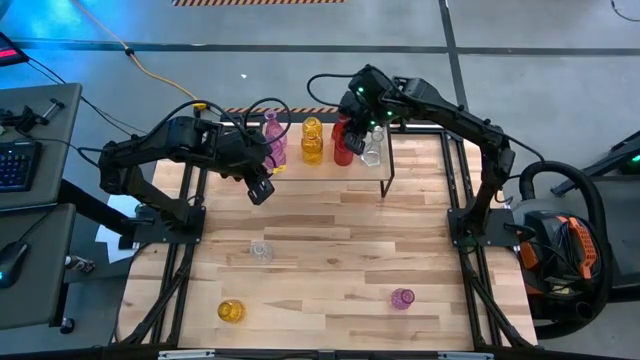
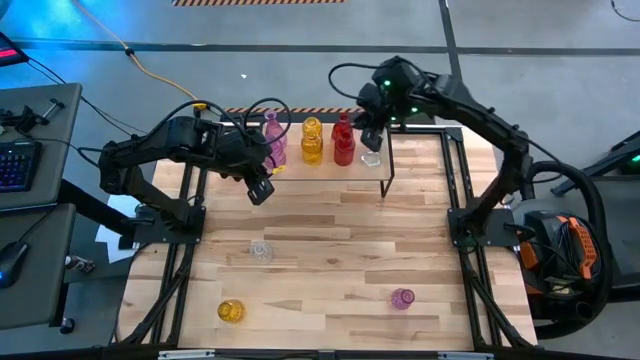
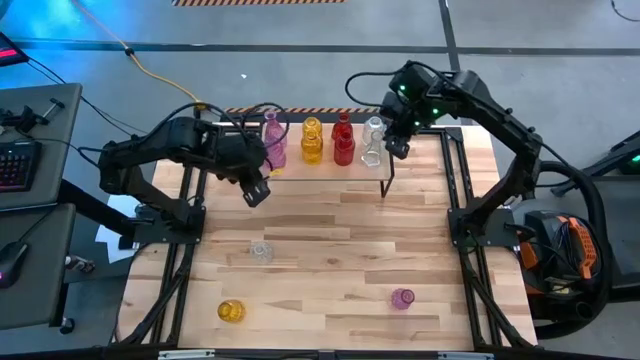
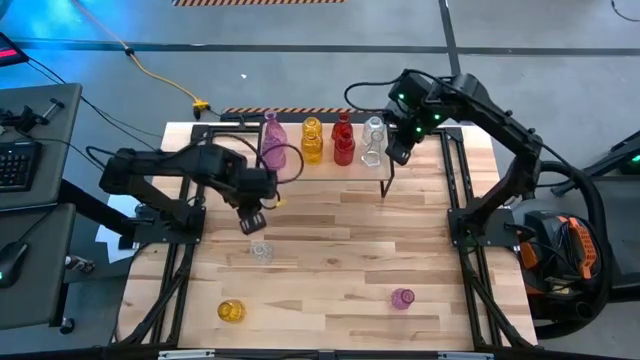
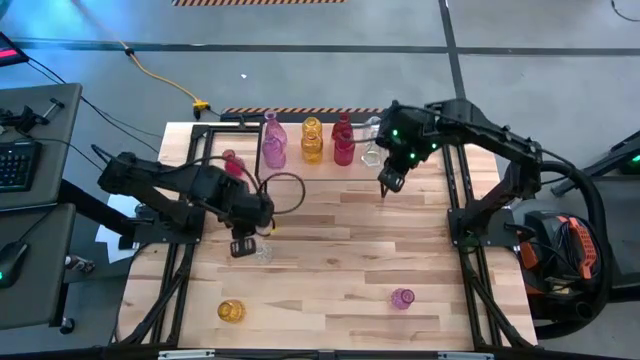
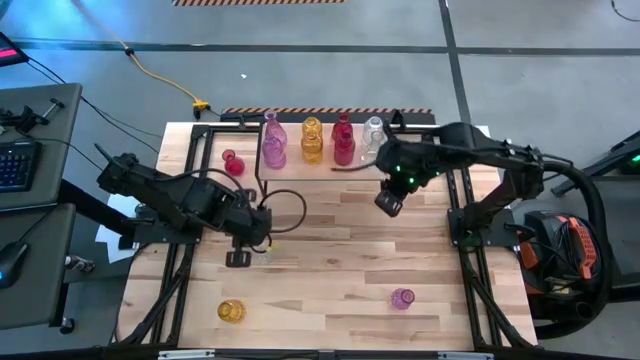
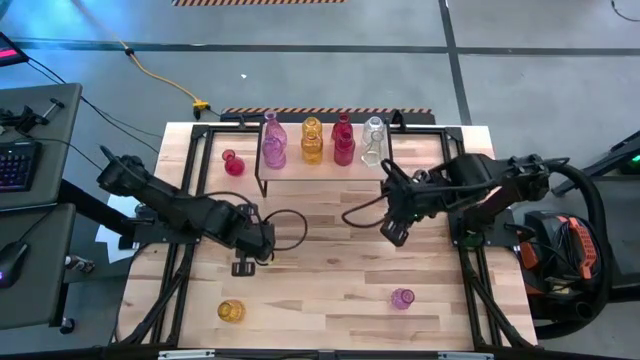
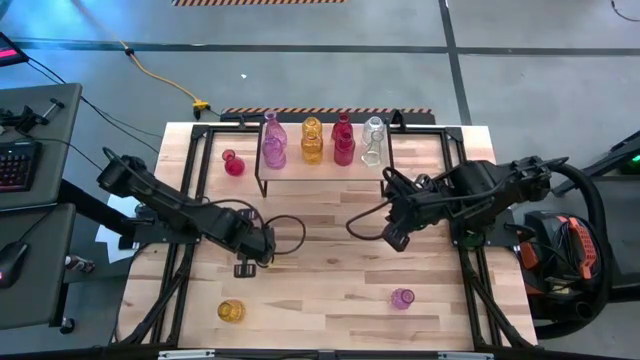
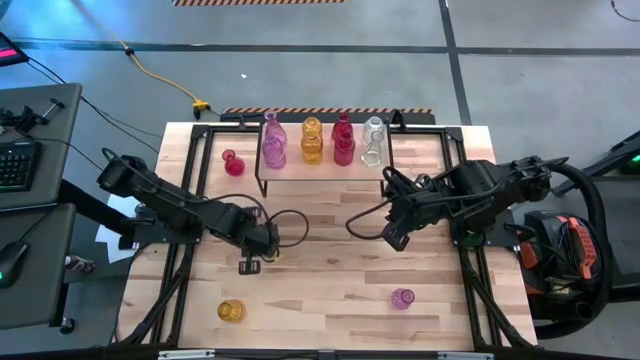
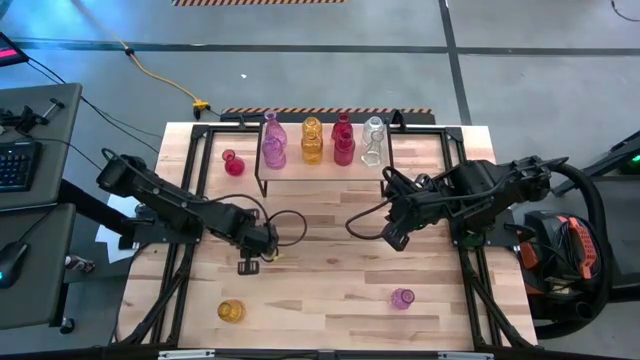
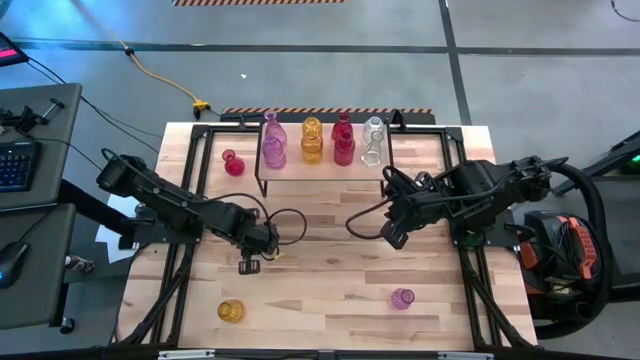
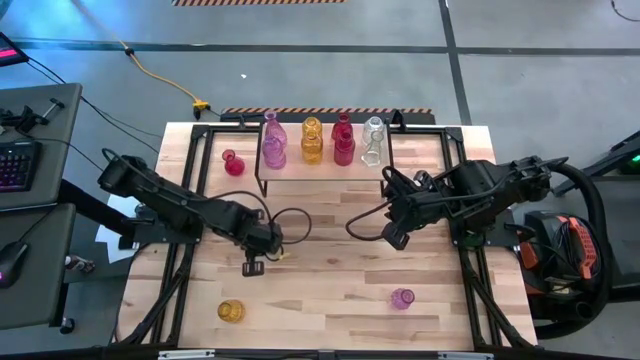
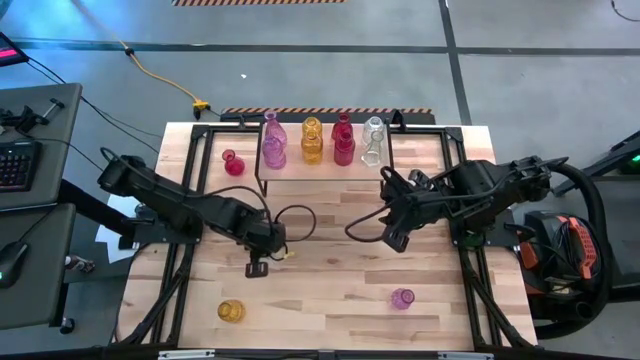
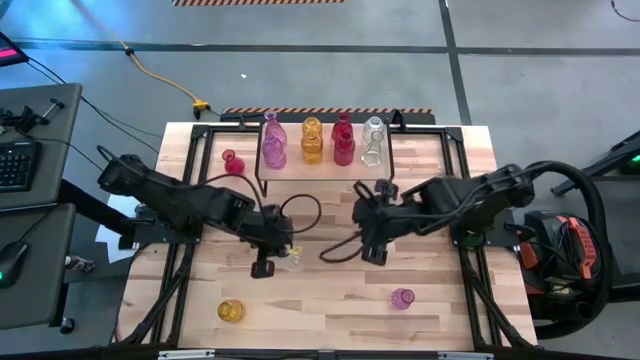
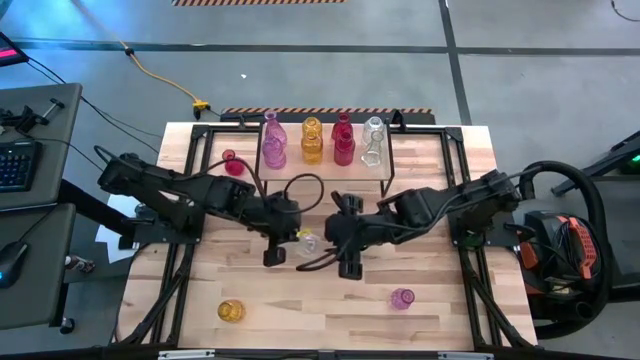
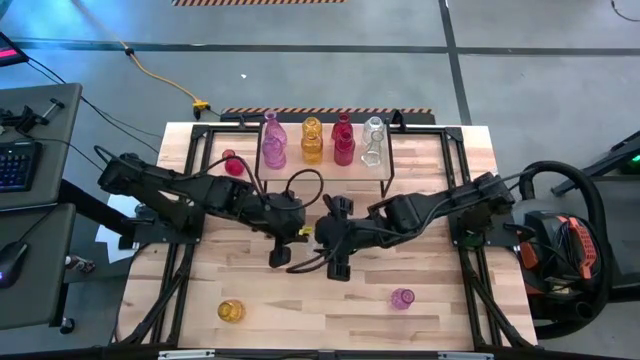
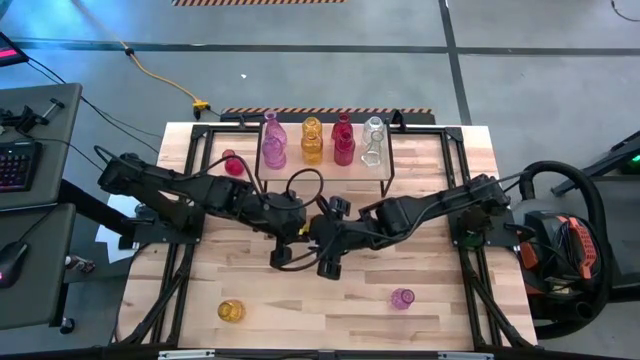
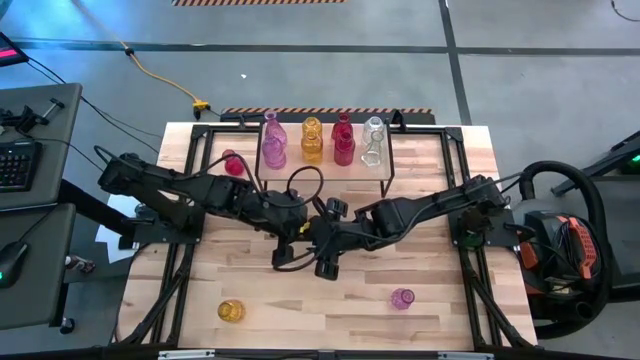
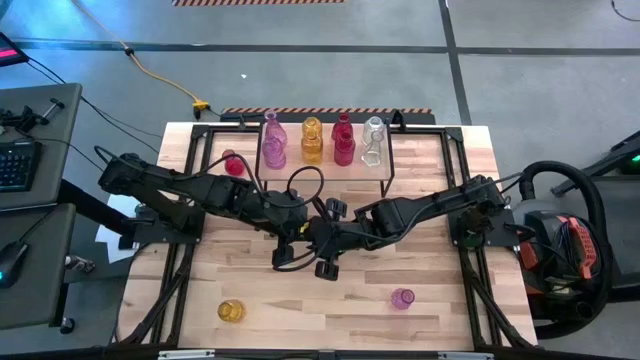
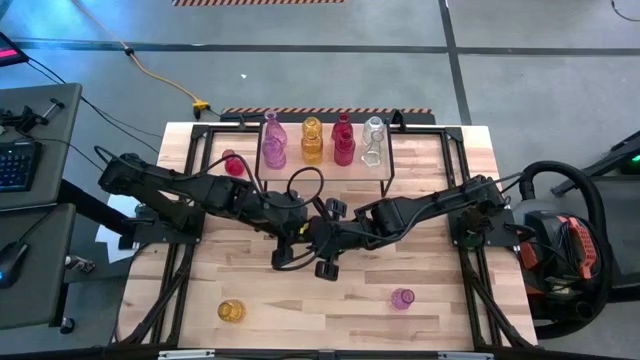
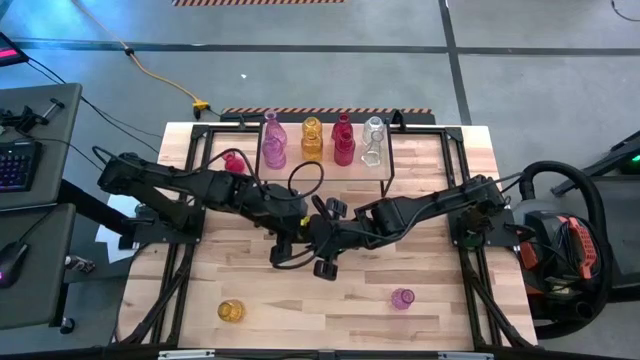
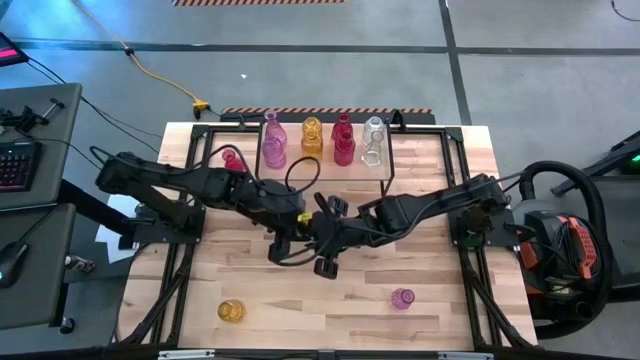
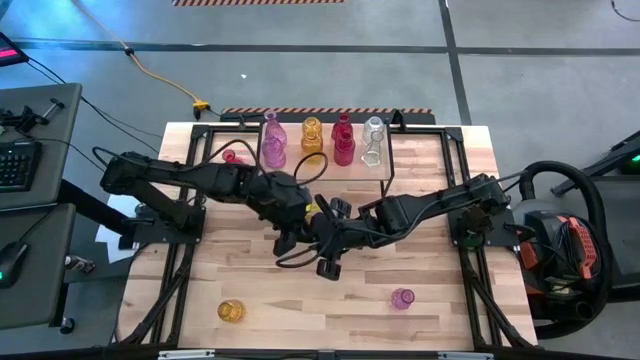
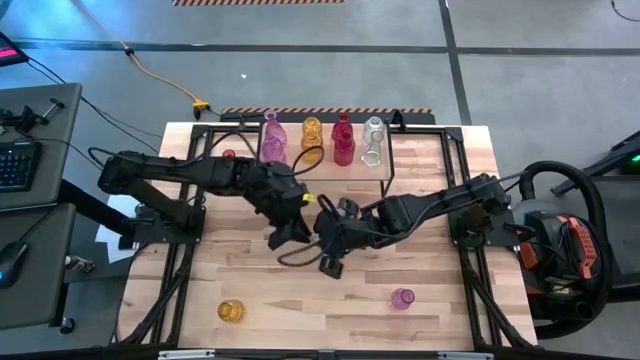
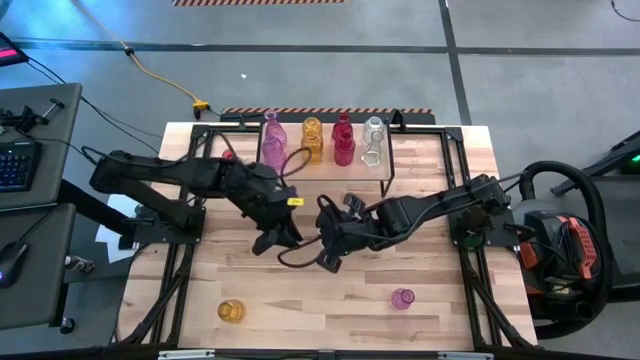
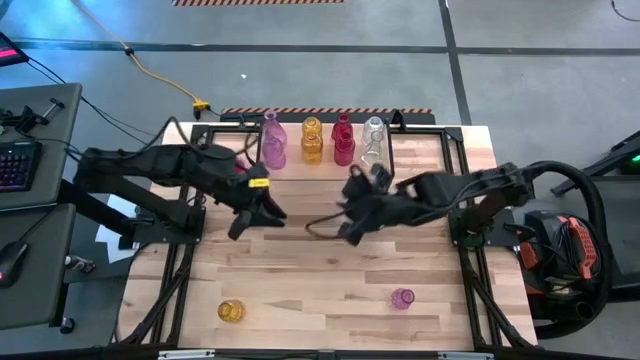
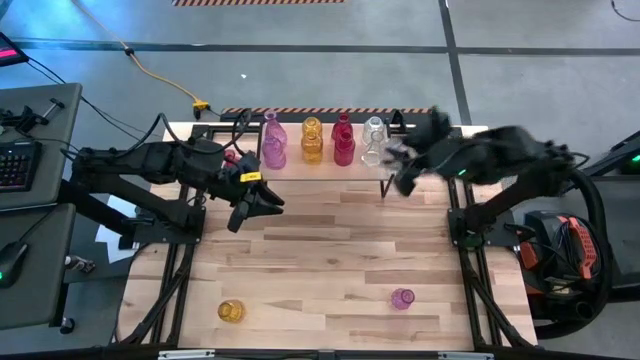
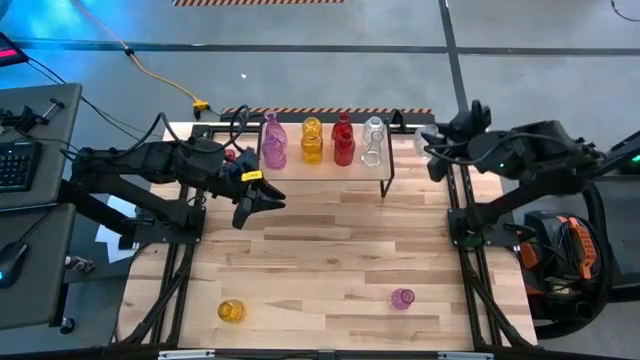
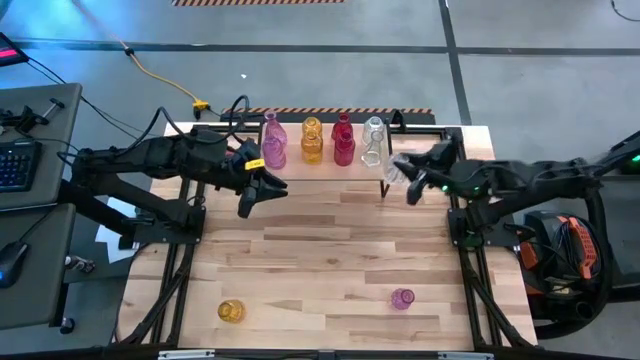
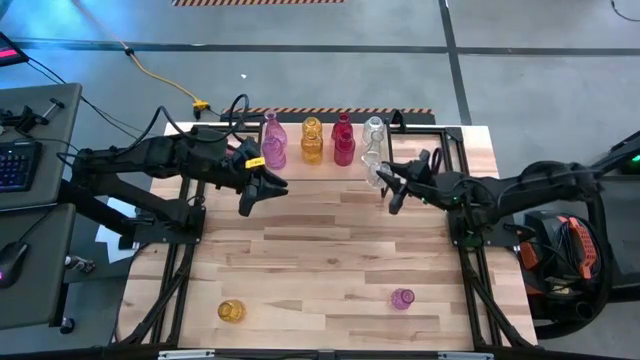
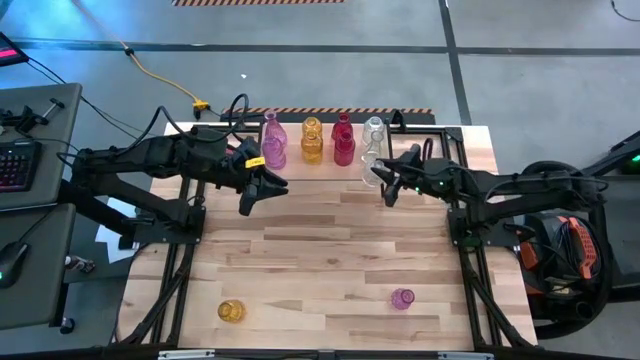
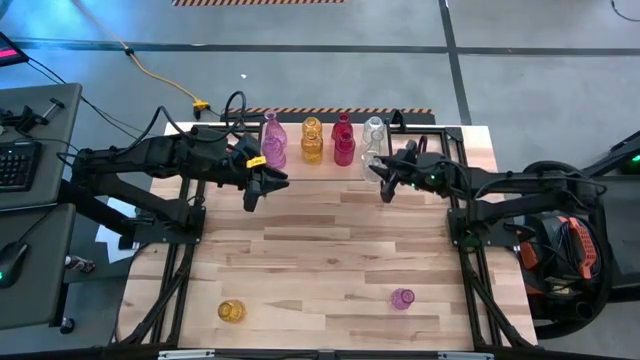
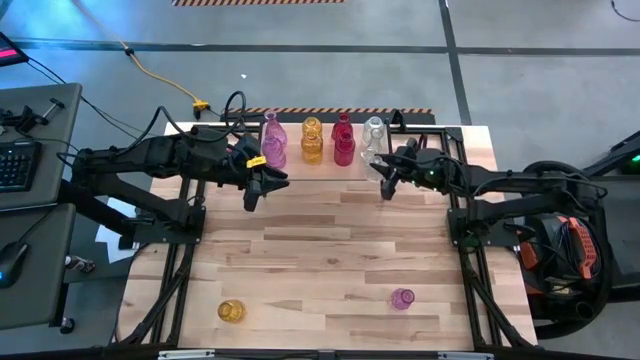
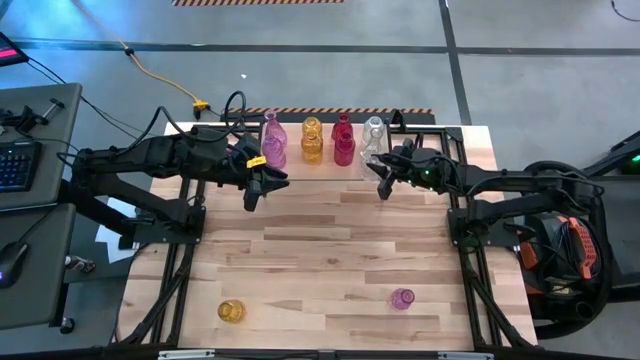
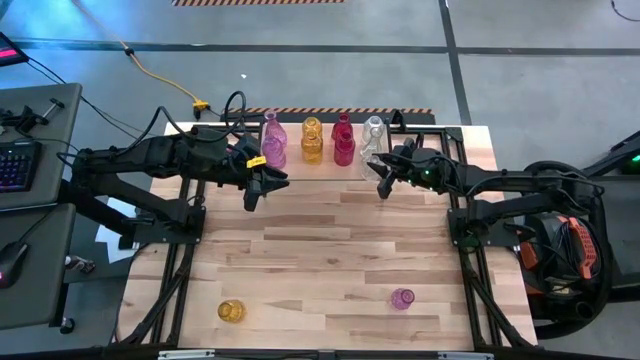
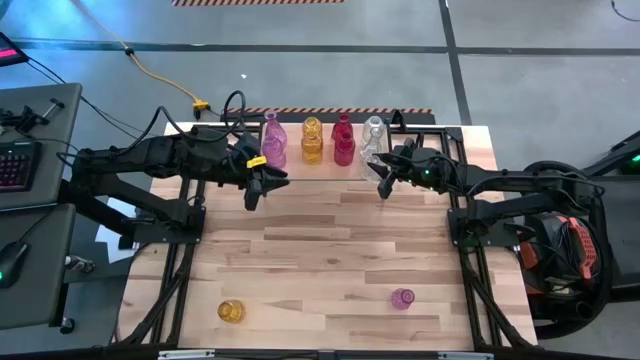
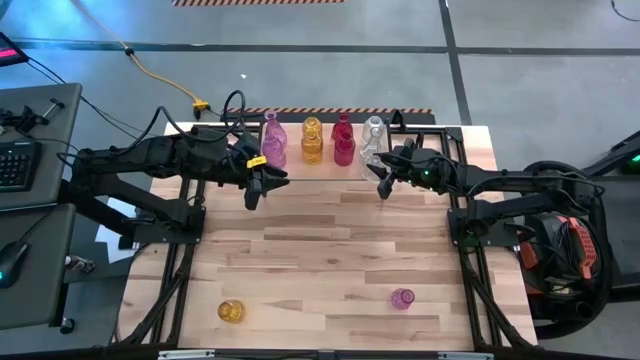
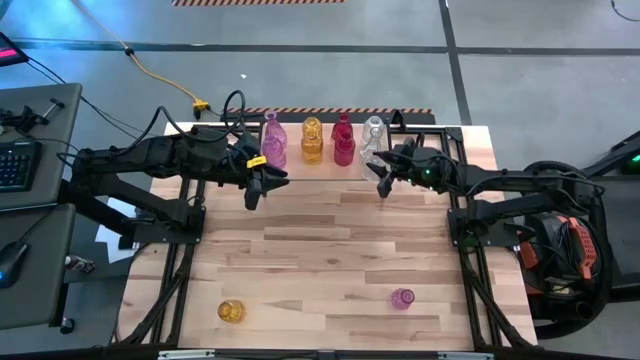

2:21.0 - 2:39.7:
Task: sort vases onto shelf
Put the transparent vase on the shelf aligned with the other transparent vases

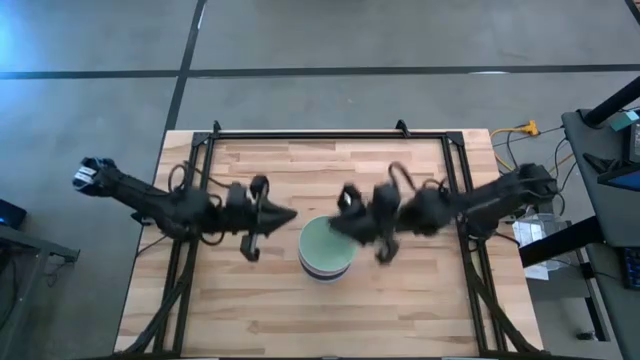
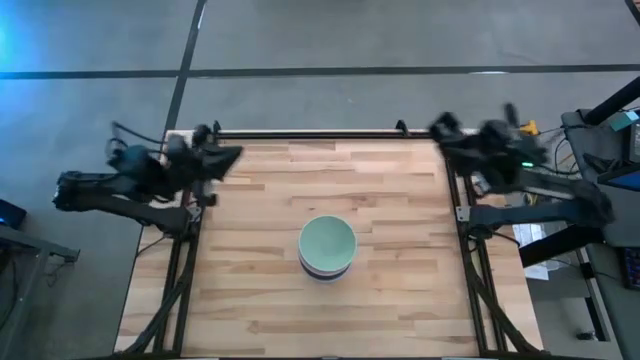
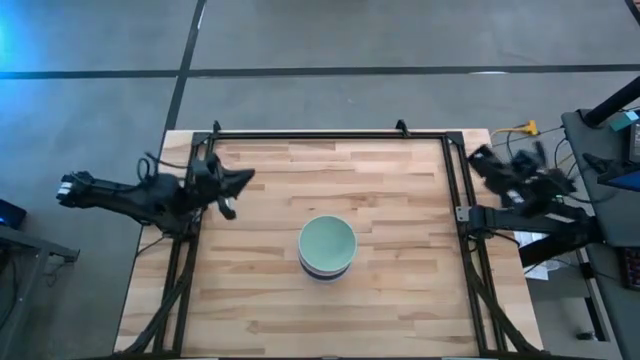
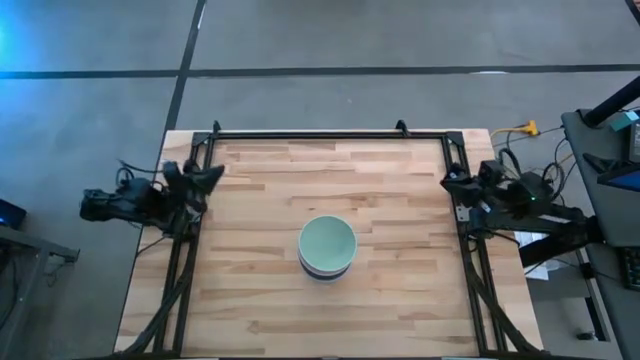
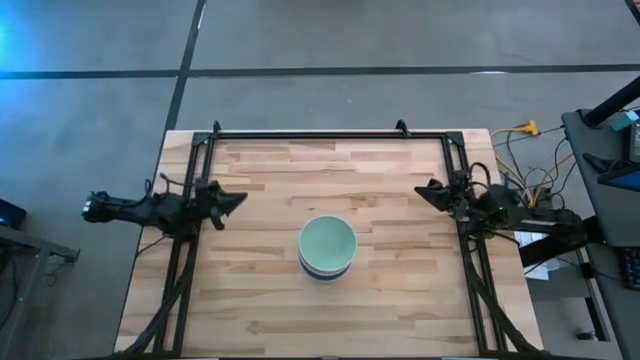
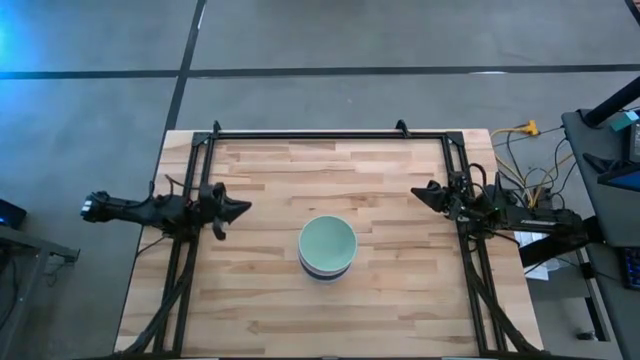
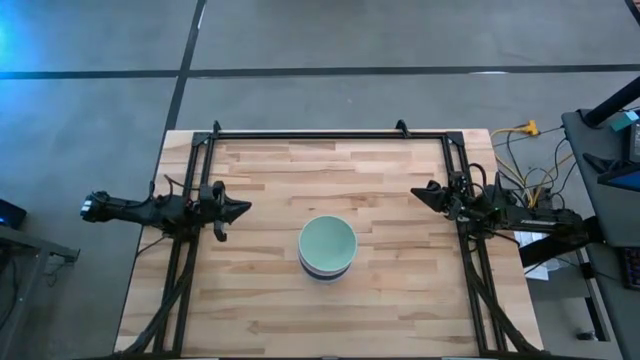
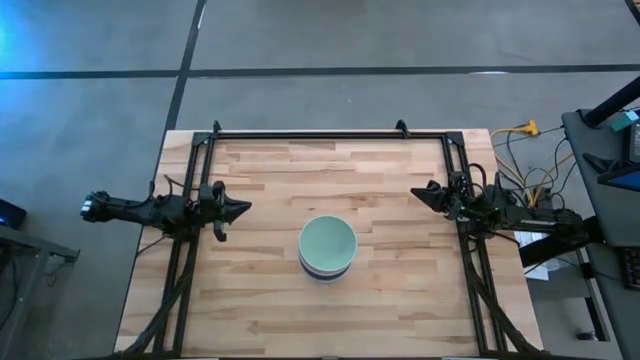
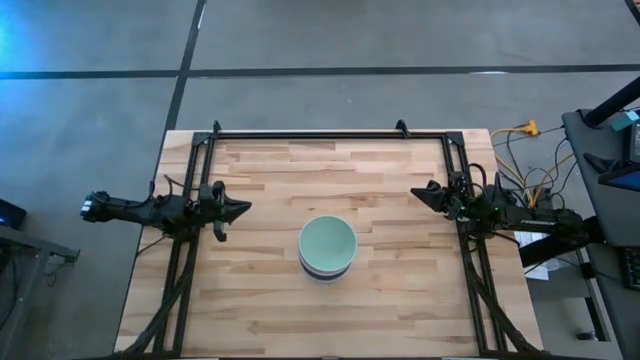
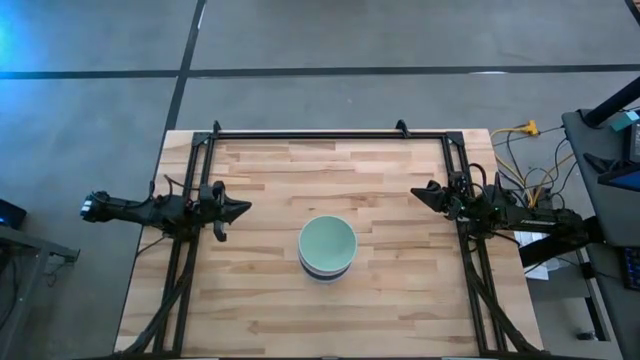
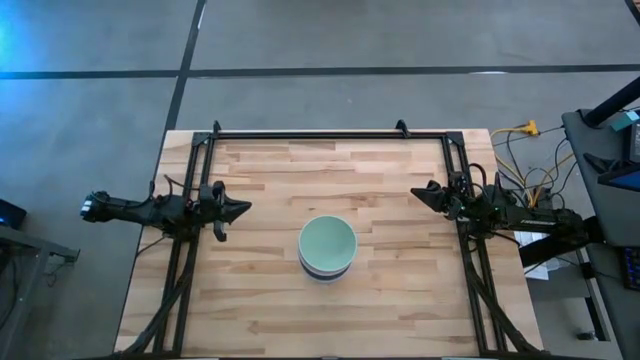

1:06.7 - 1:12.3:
Task: Nest bowls inside each other
Return to Home Position
